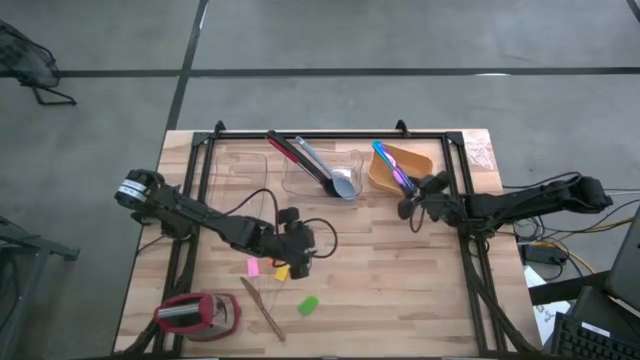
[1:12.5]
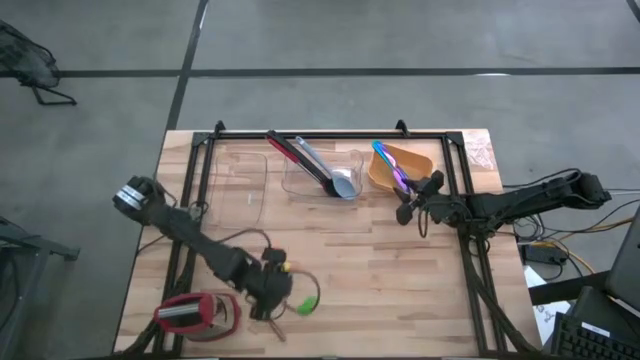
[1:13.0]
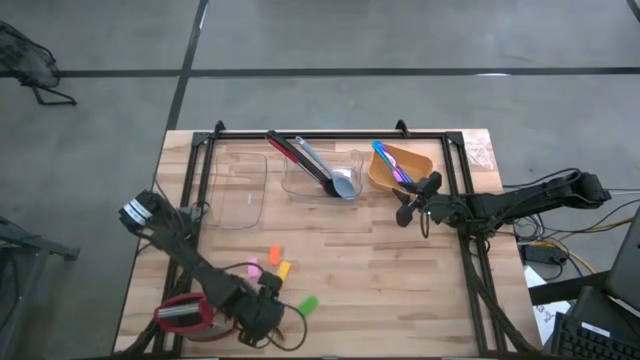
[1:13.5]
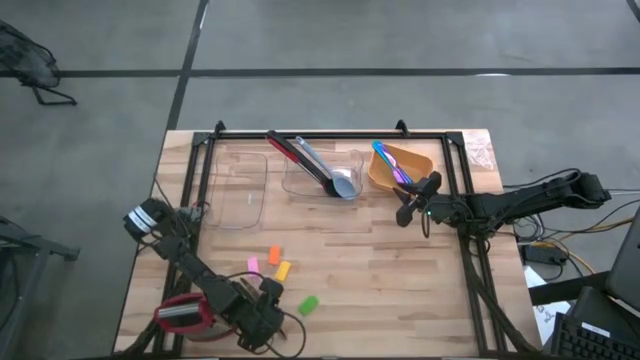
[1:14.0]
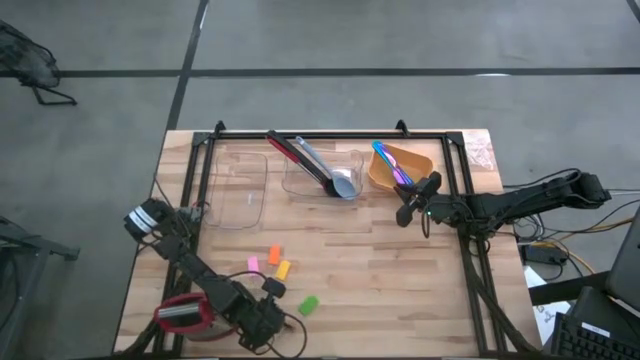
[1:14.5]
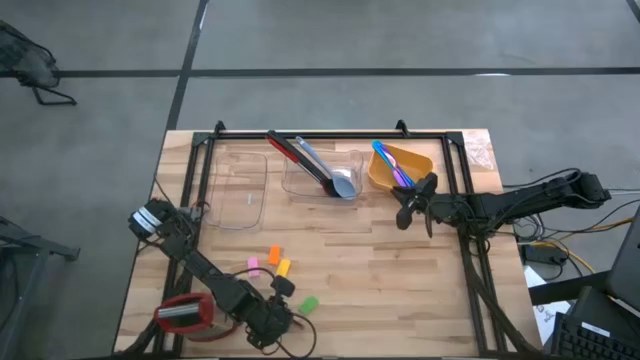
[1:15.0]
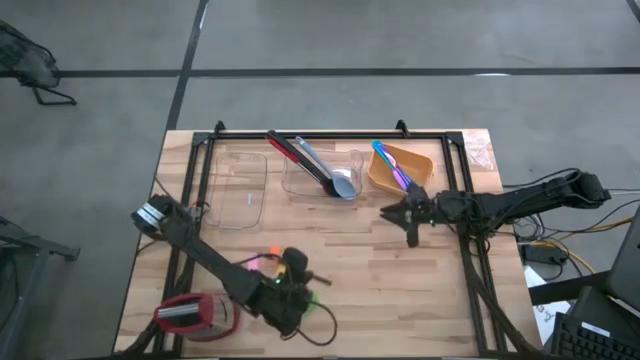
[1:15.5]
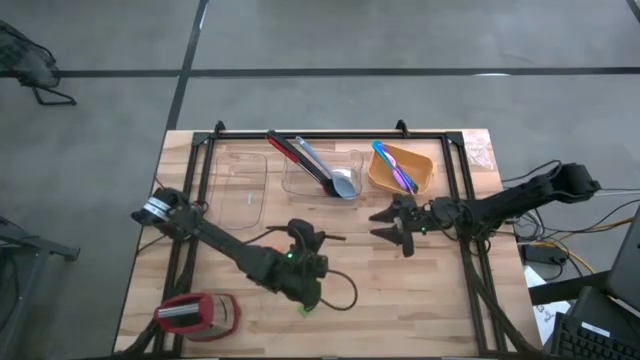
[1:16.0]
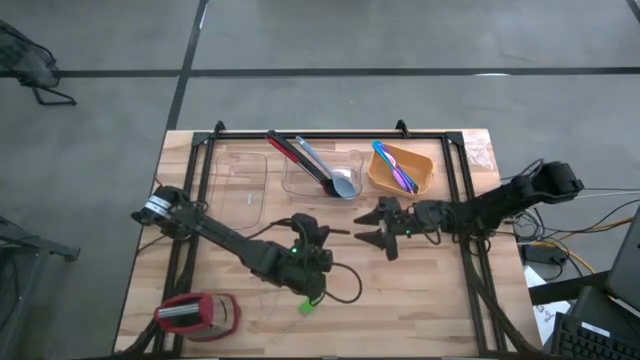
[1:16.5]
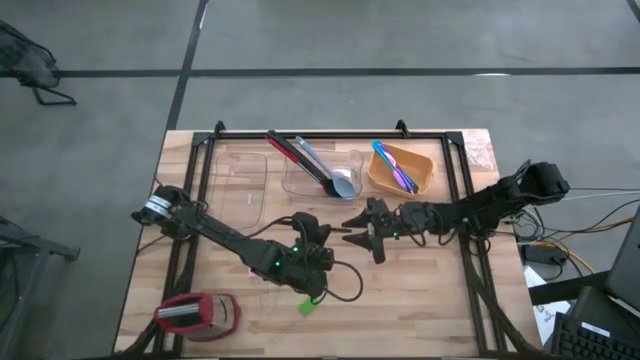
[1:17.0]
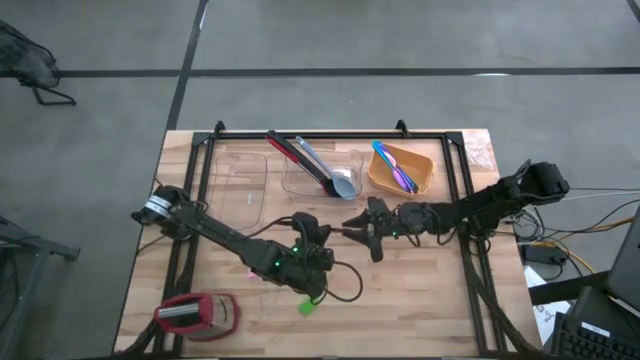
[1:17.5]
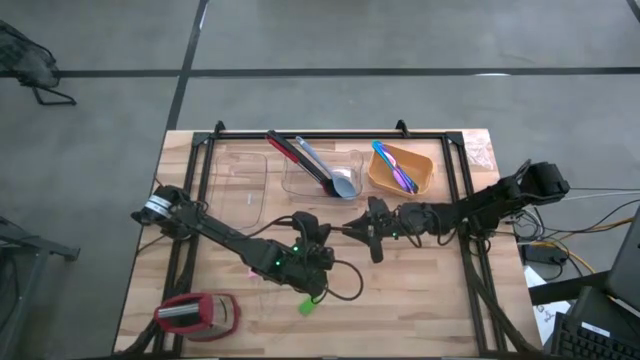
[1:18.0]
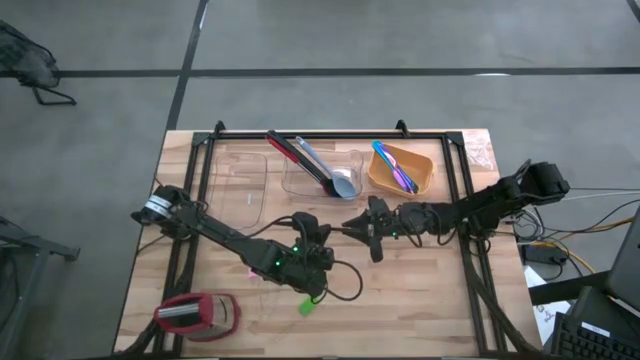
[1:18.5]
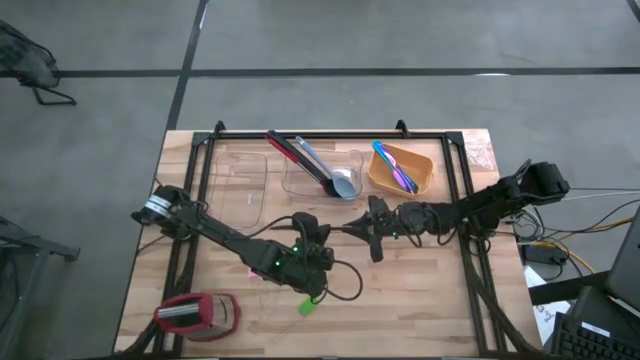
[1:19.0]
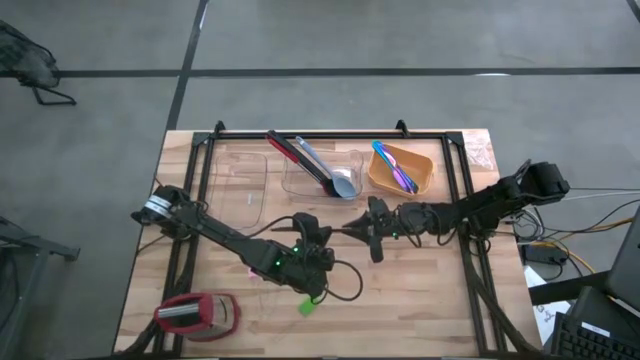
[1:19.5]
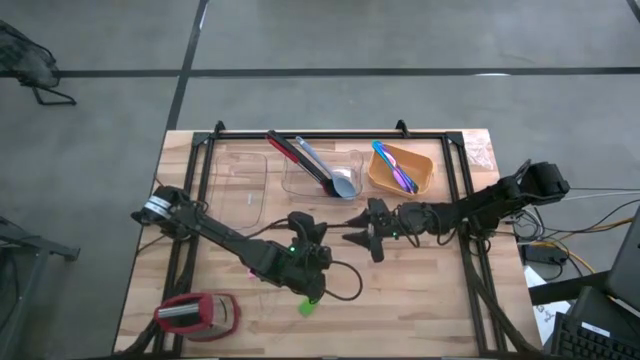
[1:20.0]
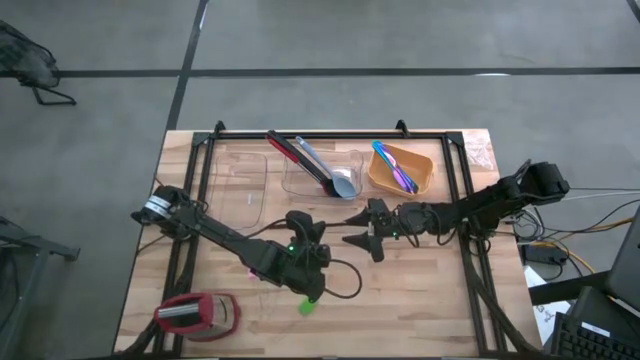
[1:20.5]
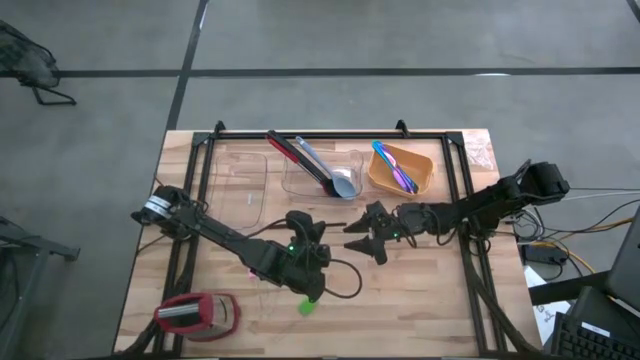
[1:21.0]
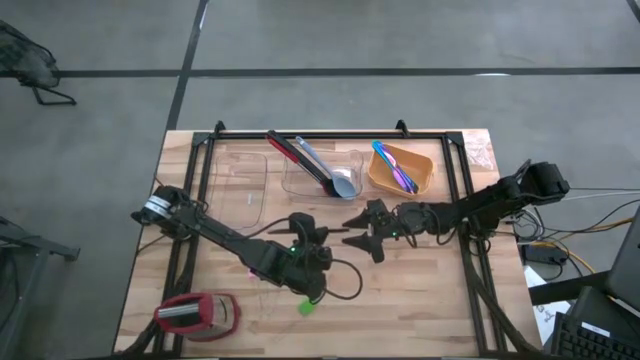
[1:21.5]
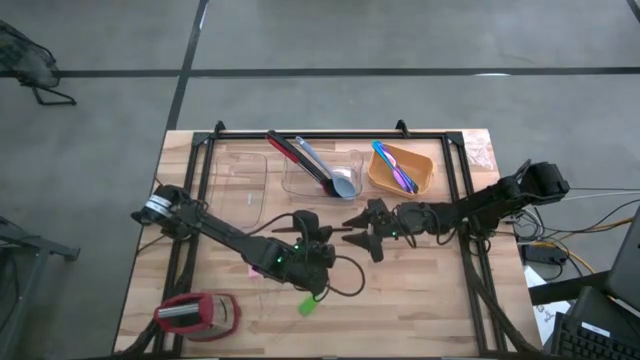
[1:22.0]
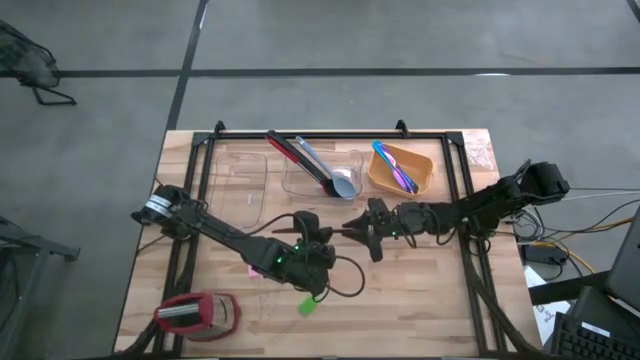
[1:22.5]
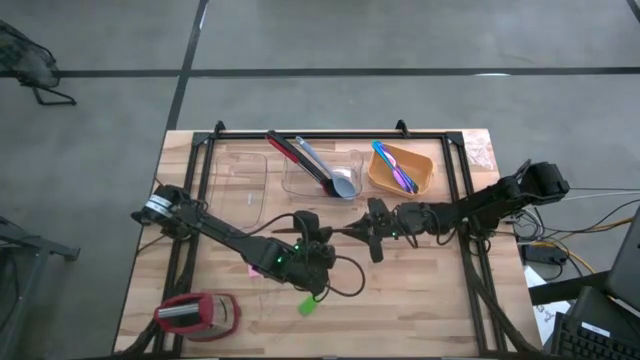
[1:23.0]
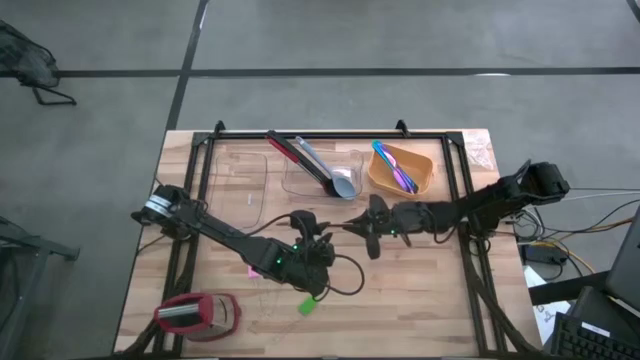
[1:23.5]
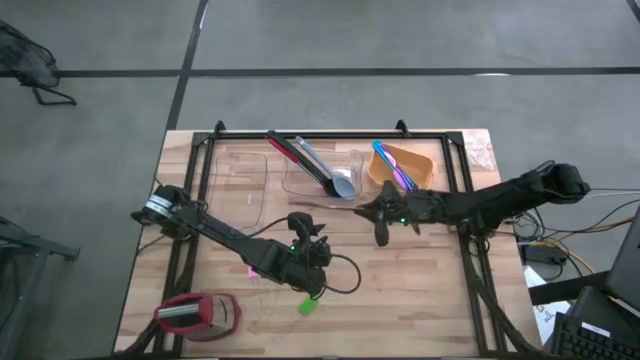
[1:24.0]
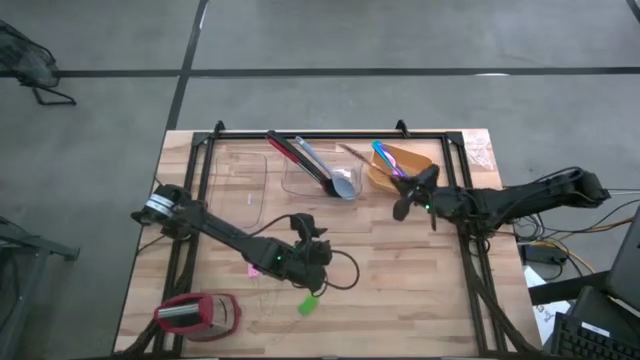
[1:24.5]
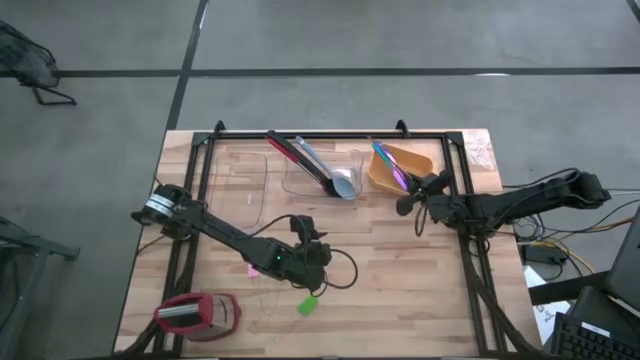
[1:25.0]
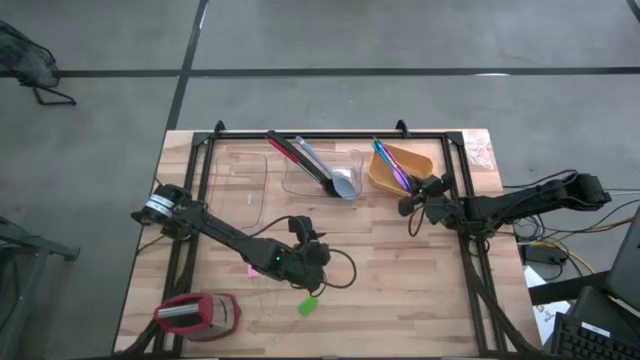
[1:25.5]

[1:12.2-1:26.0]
Task: Sort silverware by color (type)
Put the gold knife into the yellow bin

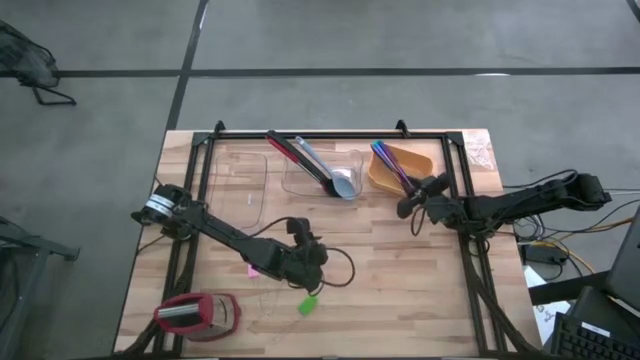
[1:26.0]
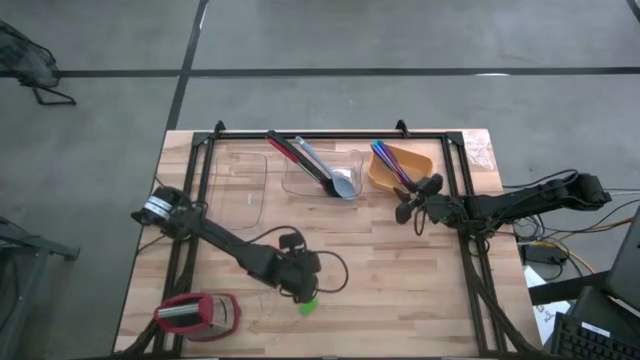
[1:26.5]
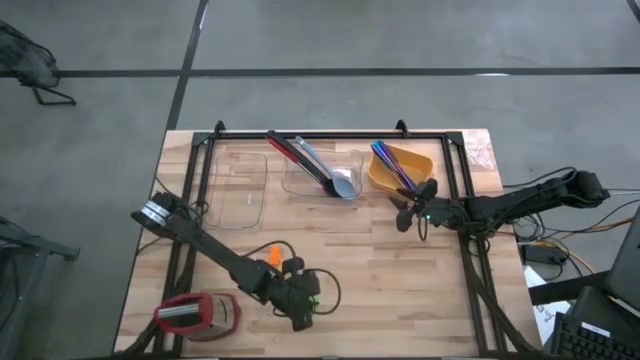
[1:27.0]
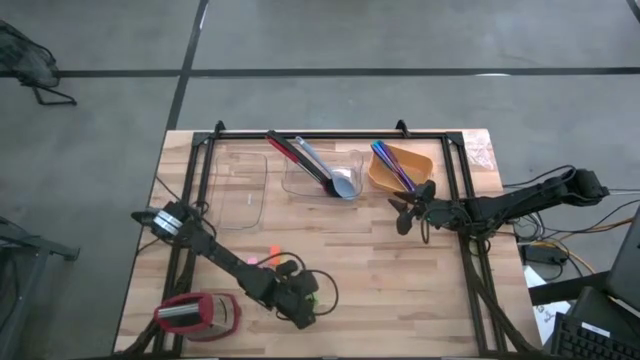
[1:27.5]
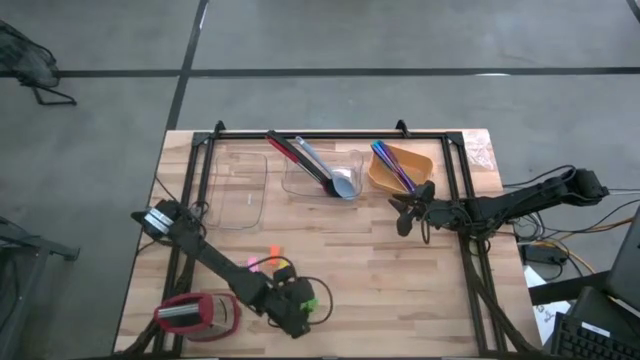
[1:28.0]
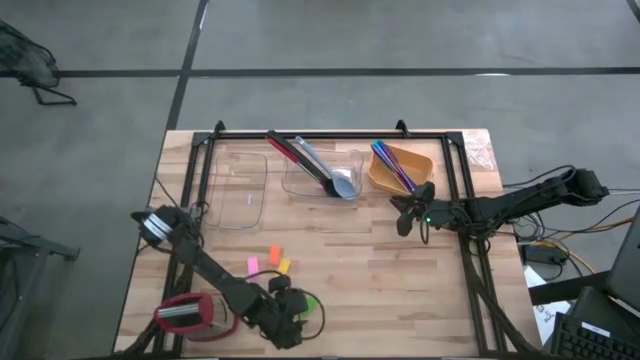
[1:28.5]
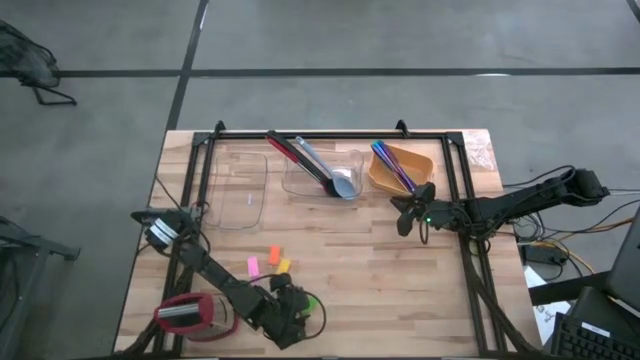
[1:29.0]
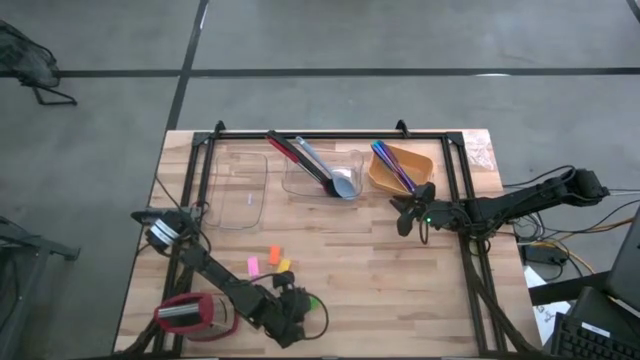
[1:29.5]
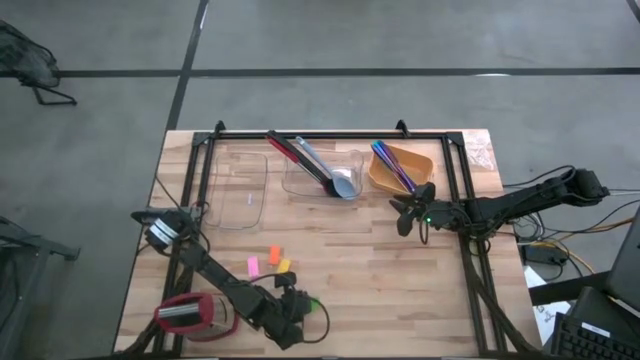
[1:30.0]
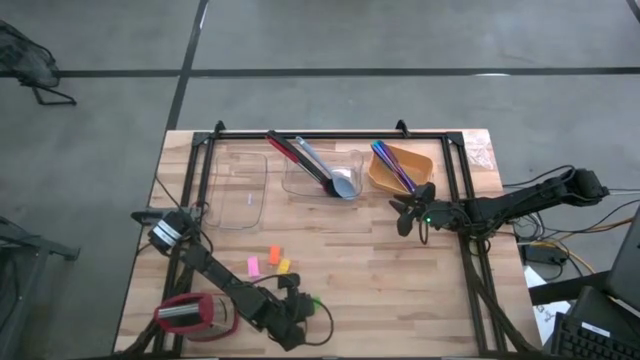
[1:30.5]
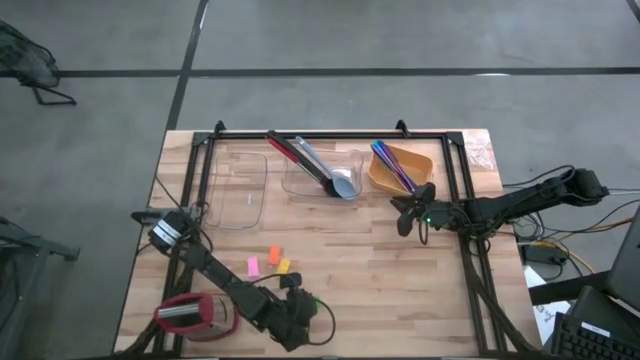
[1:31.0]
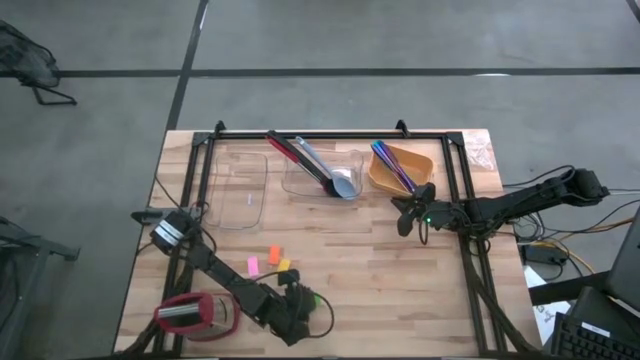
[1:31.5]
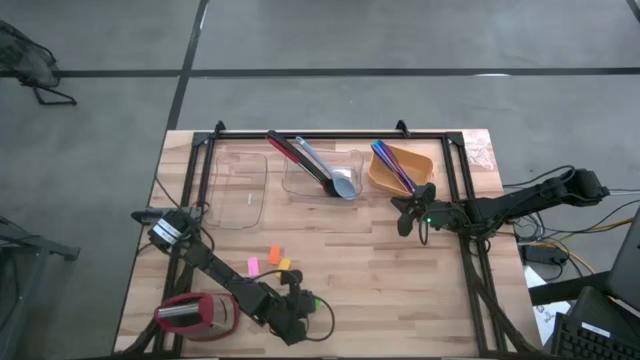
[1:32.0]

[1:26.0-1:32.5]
Put the green spatula into the left transparent bin

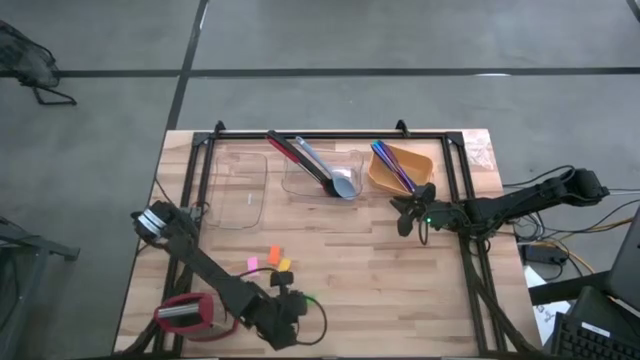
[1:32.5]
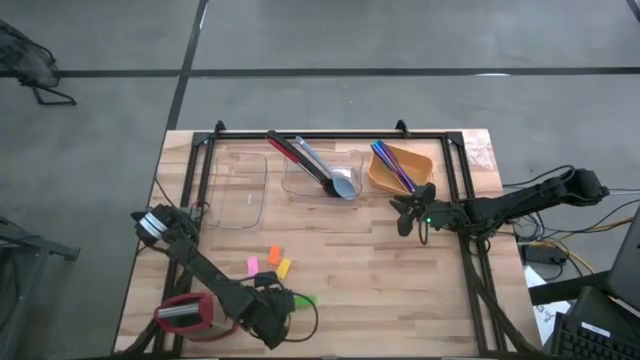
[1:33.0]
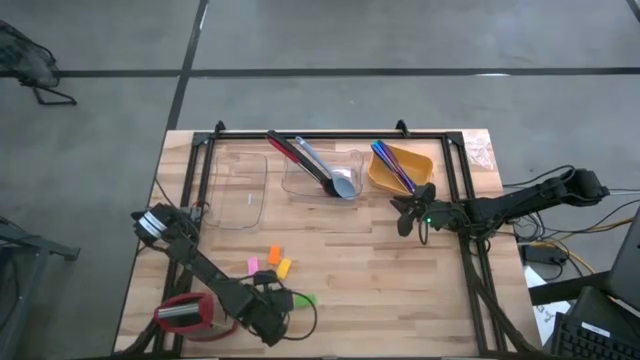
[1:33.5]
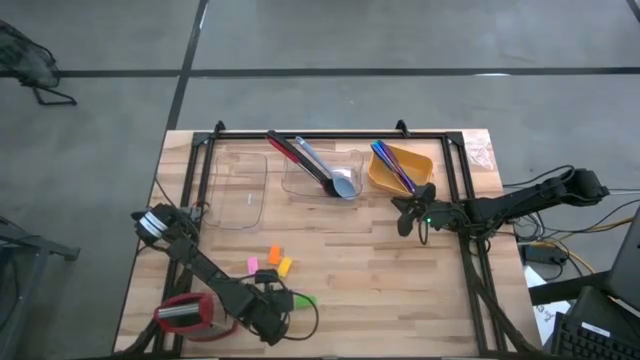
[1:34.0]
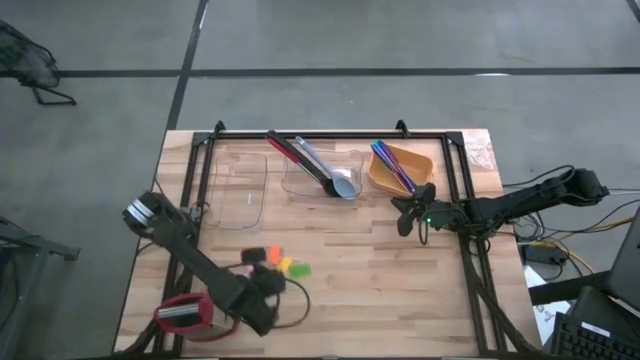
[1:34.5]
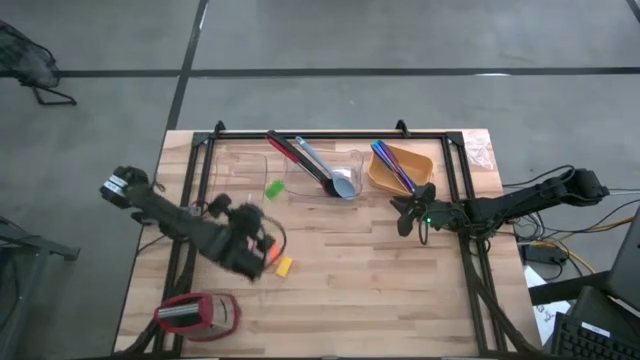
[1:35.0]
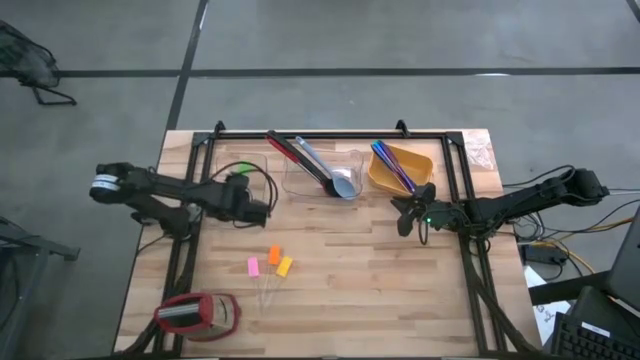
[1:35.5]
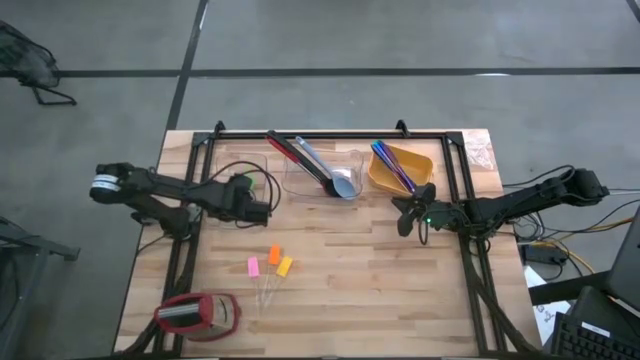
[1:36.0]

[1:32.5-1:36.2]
Put the green spatula into the left transparent bin
